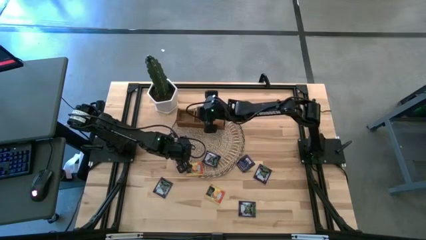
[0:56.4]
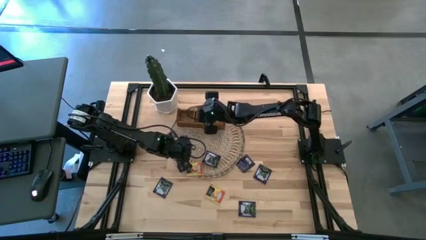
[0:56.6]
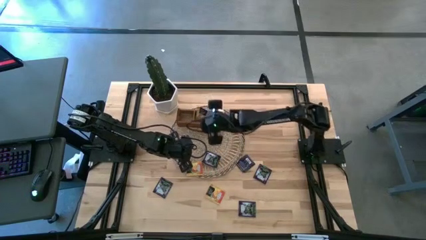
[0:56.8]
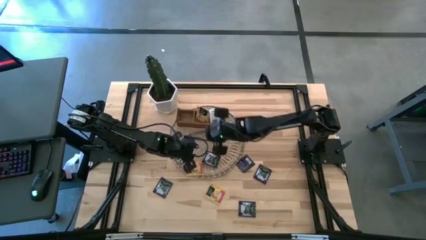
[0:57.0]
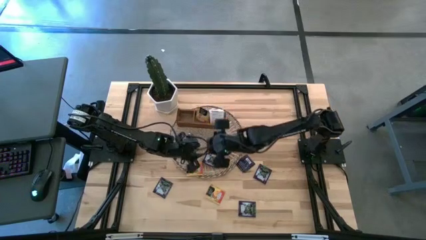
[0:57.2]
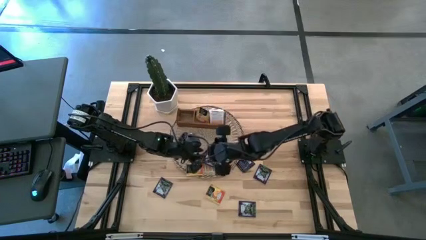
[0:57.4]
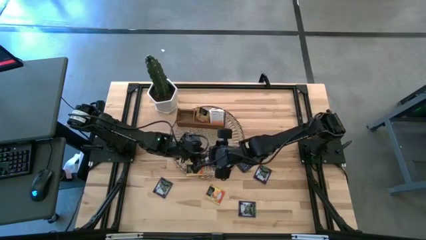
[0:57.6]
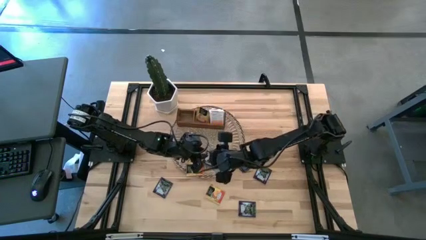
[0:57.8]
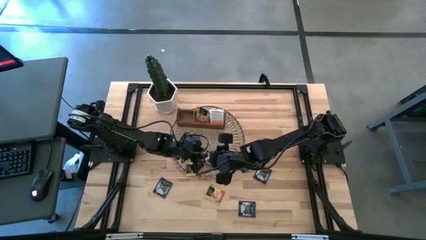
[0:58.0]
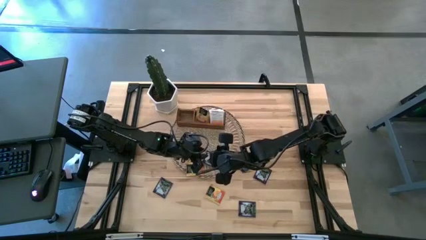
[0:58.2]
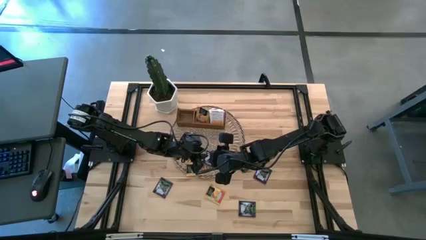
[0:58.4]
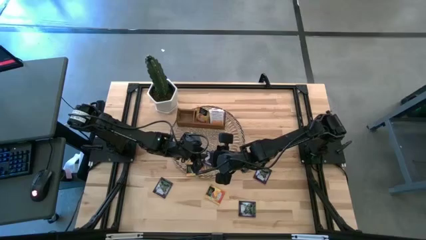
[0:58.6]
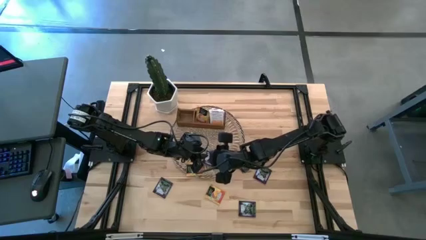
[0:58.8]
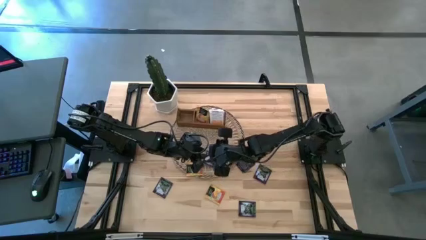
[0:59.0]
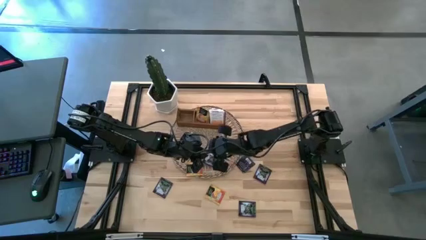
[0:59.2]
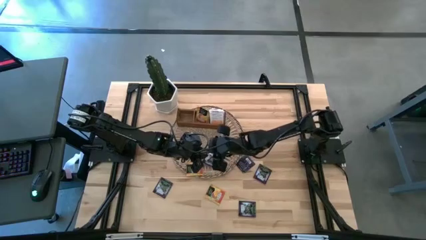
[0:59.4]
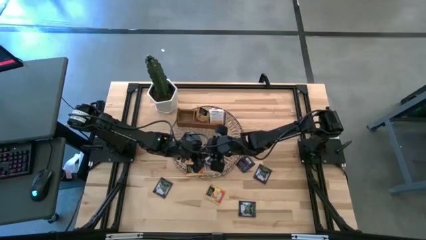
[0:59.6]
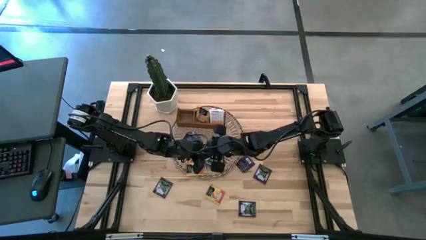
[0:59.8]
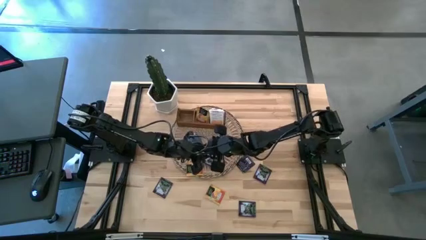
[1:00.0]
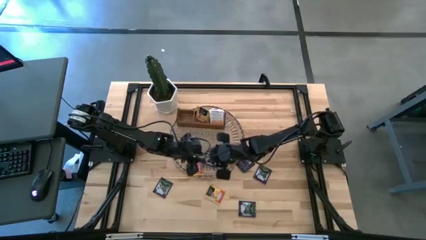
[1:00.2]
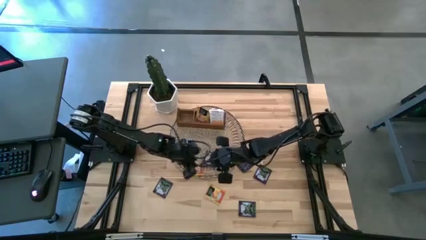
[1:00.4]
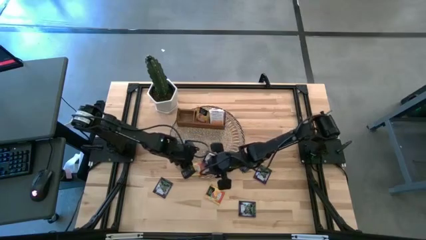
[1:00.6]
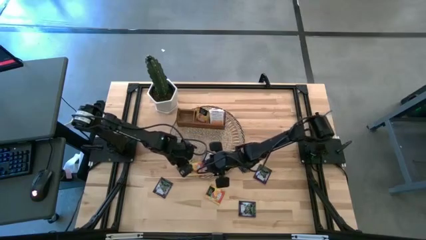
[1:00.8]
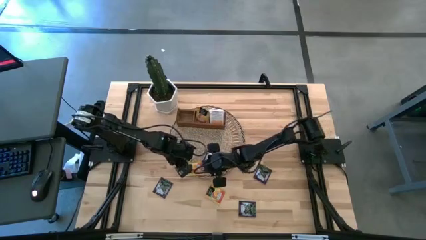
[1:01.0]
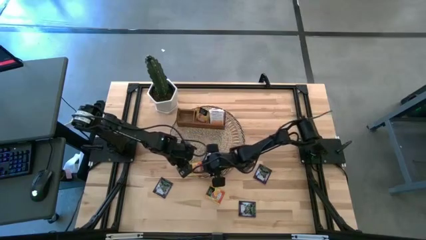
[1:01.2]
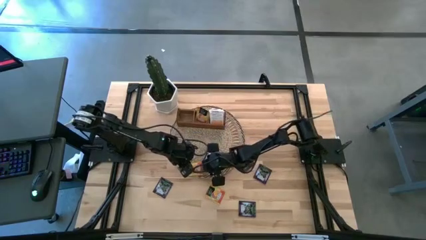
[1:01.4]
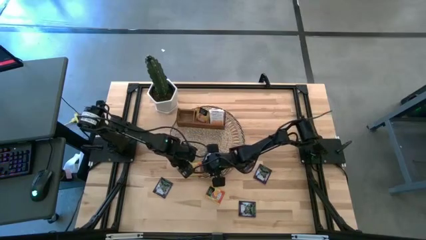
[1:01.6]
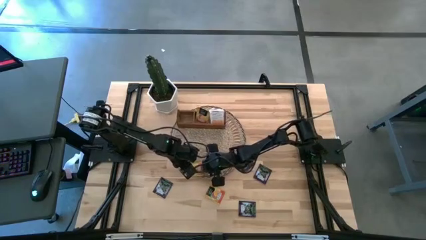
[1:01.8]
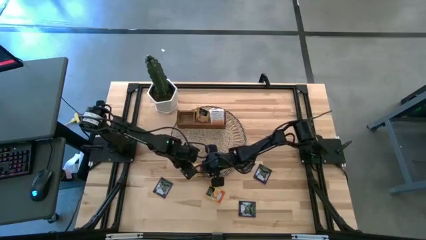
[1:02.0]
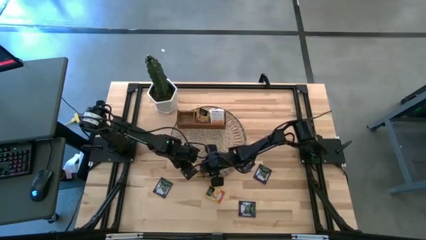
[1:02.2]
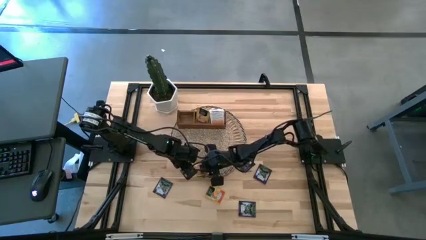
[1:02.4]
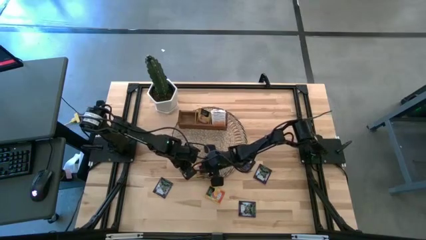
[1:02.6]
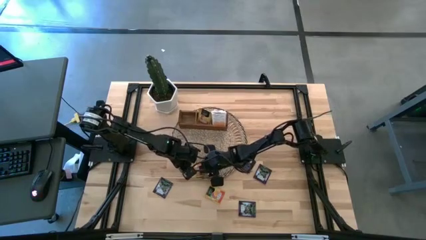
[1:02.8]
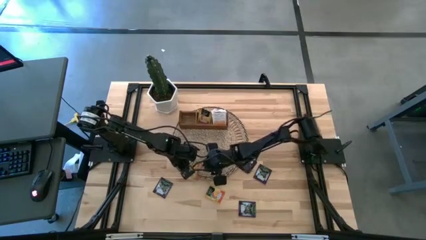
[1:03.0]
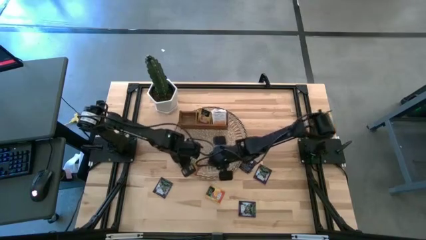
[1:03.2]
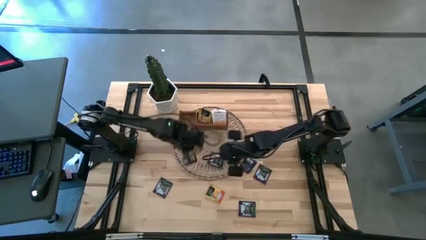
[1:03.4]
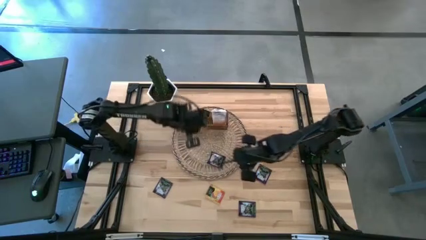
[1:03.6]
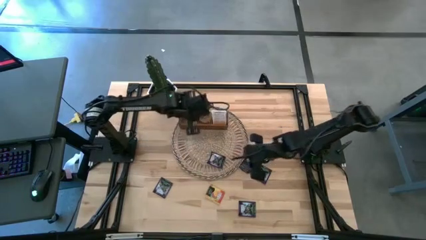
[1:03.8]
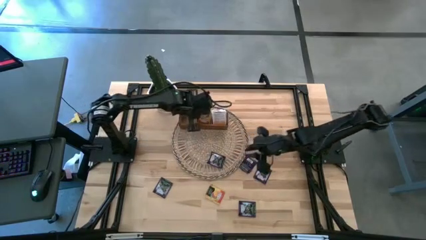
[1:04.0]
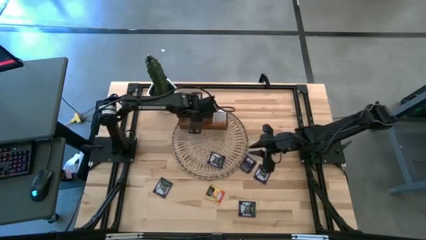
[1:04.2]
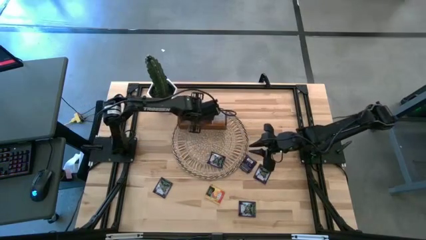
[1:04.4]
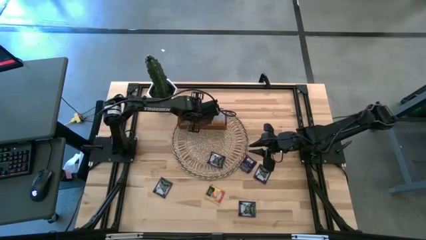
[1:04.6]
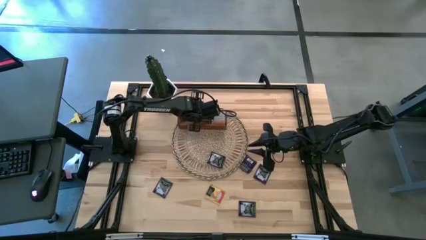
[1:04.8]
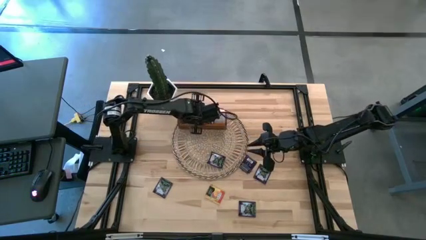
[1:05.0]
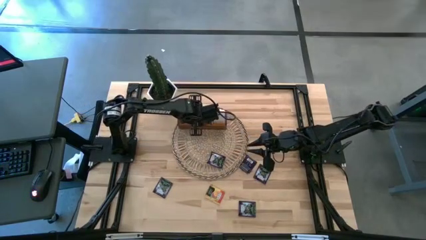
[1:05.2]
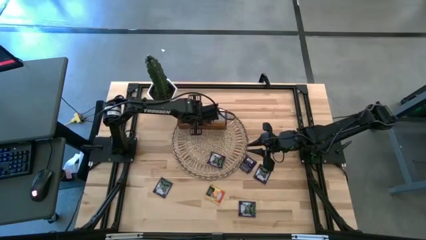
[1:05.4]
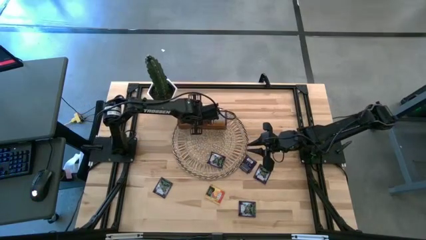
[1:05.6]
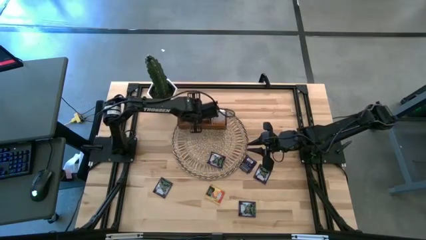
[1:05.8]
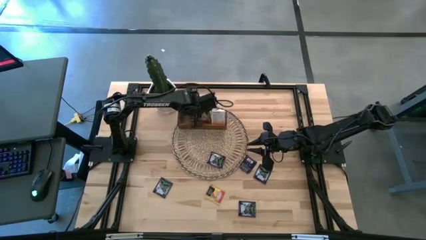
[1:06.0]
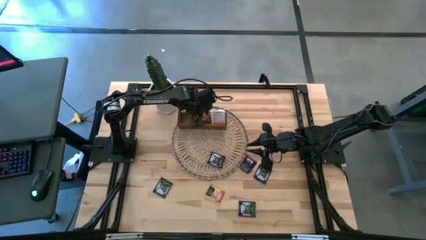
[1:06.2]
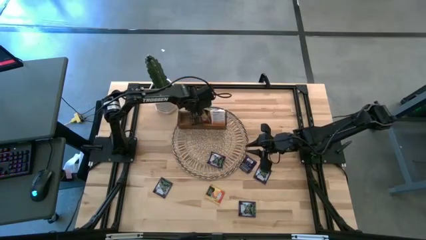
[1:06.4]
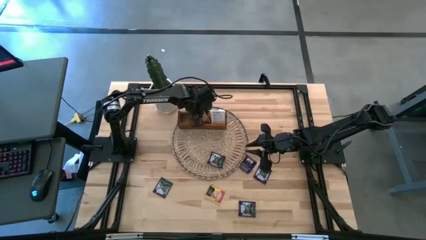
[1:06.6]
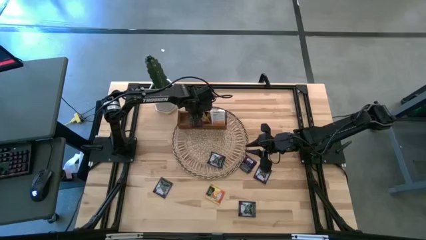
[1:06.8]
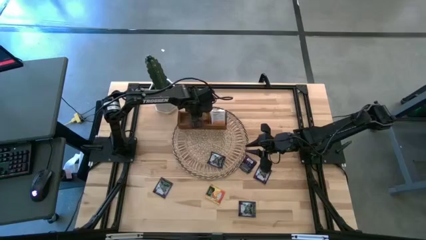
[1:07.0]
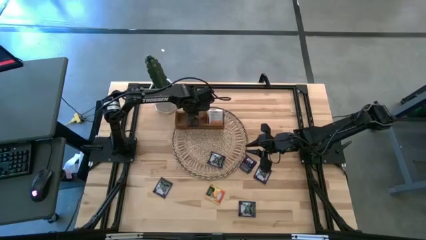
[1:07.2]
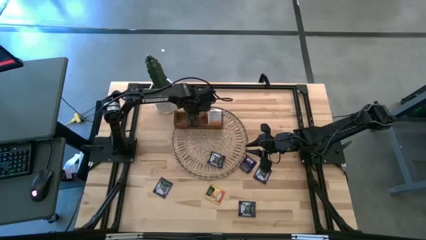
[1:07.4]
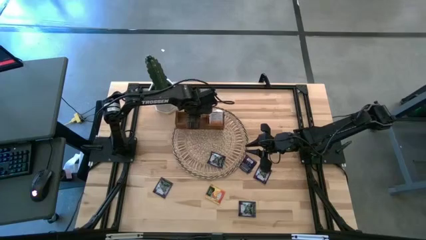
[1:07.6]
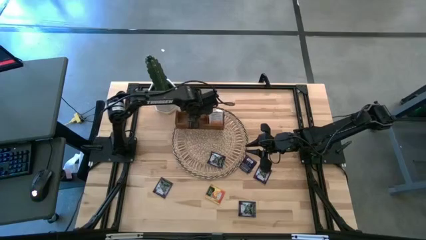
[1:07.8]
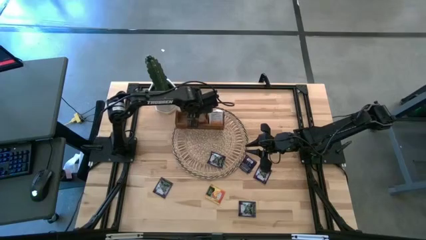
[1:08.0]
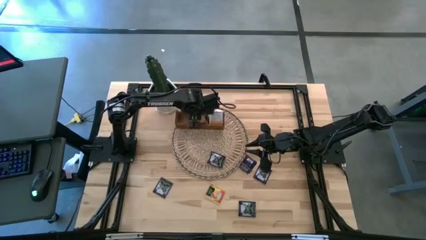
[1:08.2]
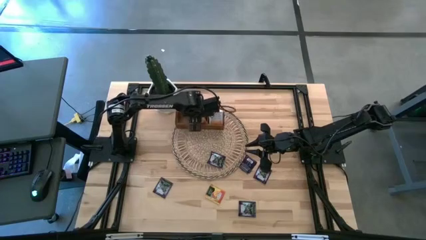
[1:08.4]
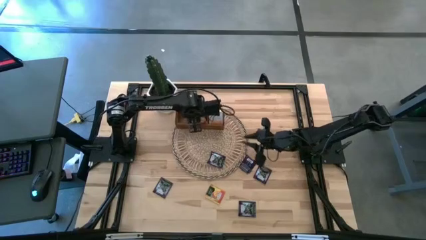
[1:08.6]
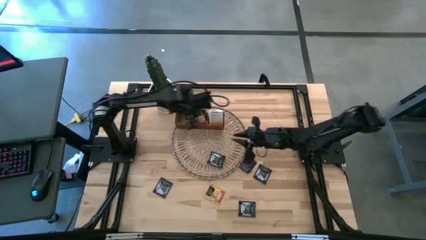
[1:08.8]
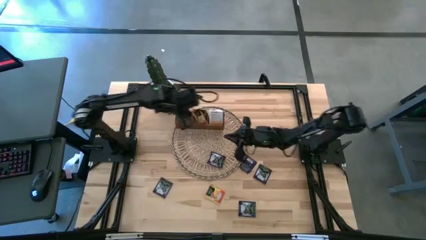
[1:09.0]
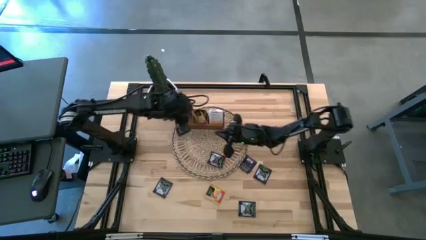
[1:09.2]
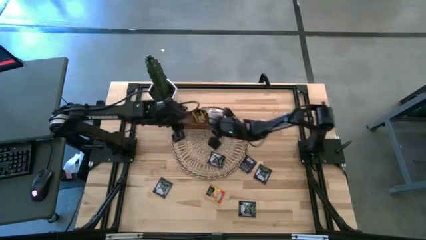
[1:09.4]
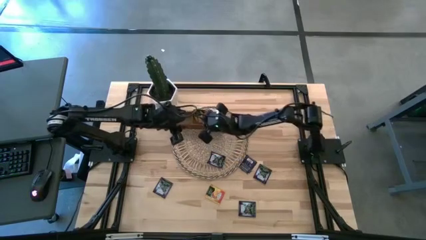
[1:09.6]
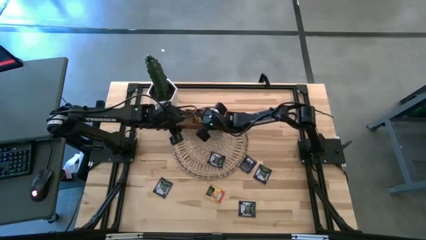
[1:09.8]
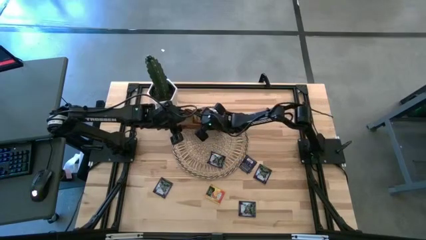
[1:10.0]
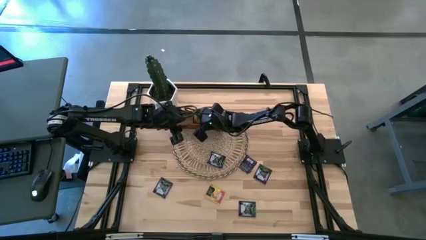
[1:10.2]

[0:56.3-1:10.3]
Task: Pick & Place Tea
Put the orange tea bag into the middle section of the wooden organizer

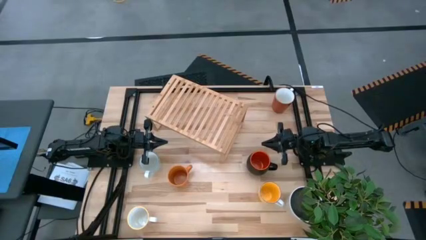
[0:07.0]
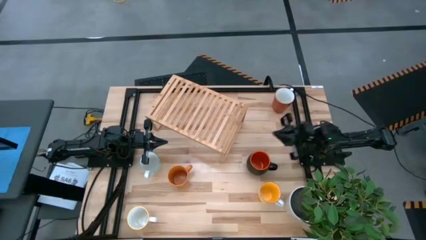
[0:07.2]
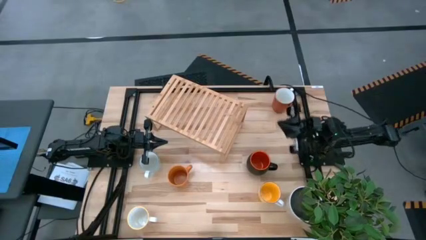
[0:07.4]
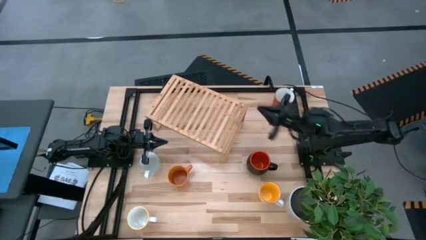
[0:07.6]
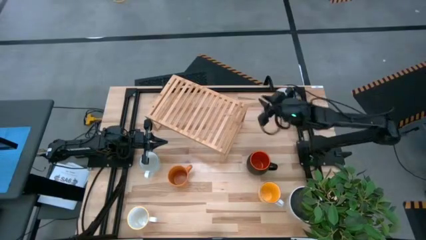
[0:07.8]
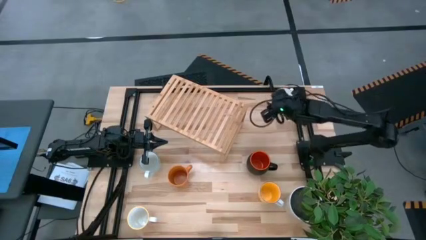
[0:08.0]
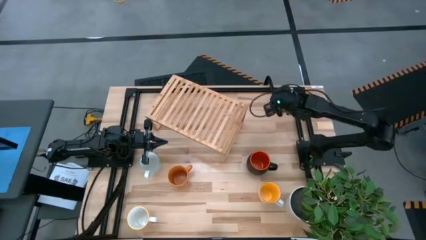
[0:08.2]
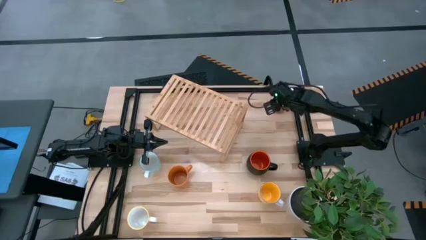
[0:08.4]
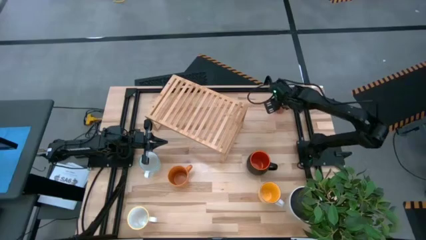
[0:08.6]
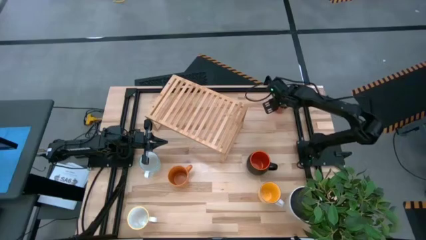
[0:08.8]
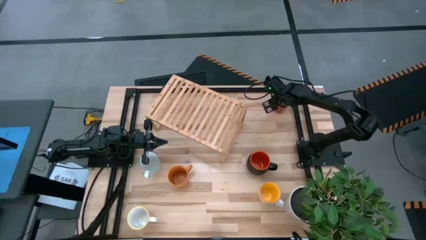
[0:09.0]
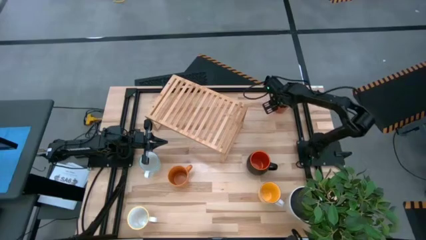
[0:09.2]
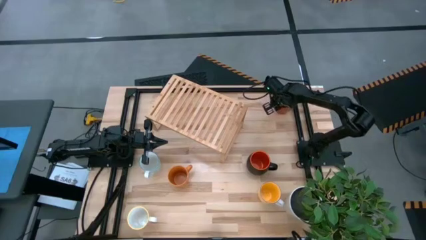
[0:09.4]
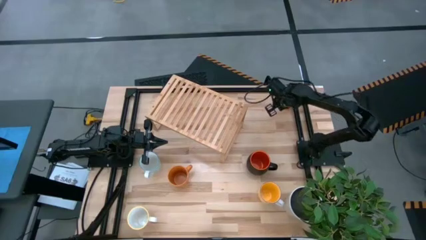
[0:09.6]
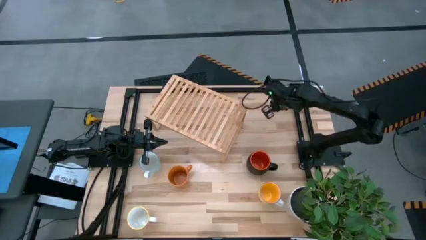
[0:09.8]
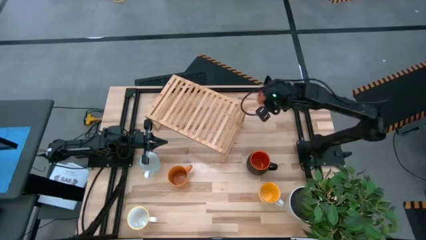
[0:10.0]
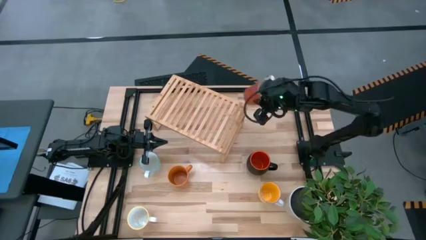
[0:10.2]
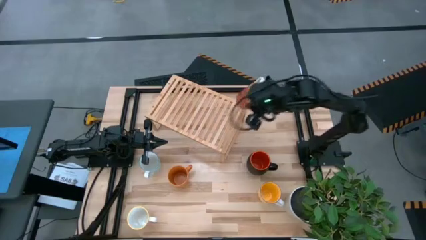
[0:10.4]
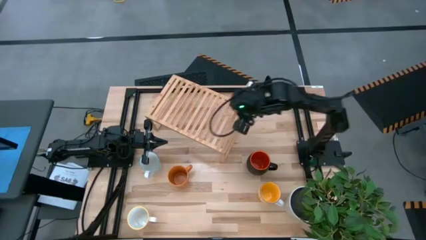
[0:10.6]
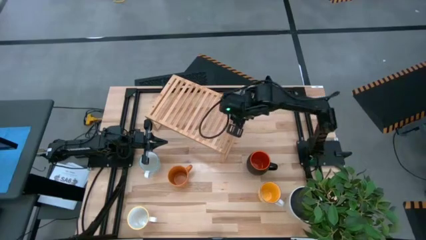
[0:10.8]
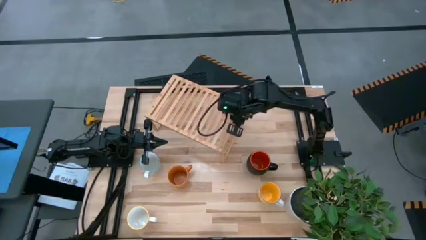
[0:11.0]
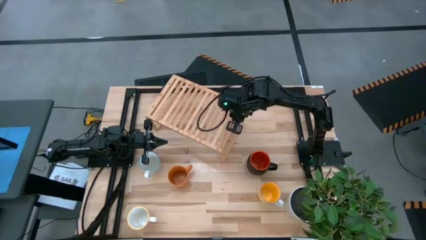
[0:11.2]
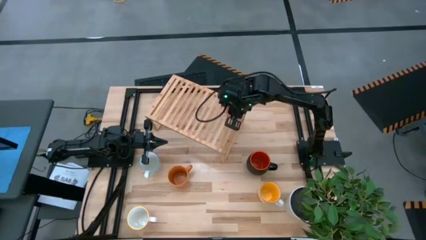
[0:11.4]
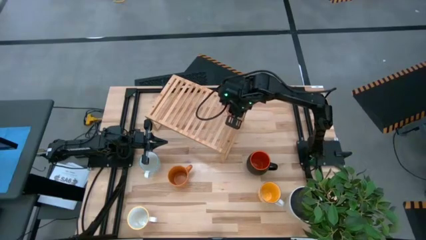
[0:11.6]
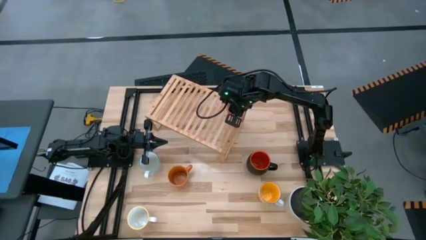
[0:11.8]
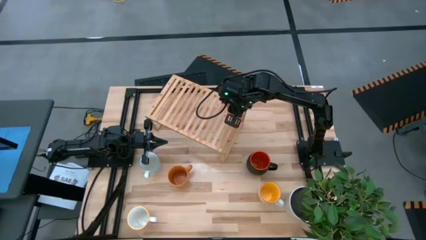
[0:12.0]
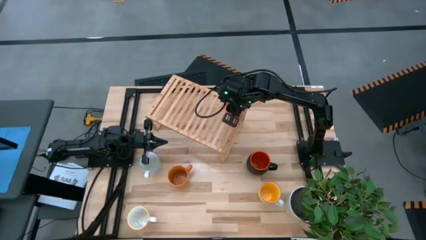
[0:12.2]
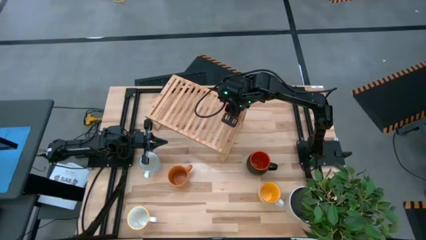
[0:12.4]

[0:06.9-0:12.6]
Task: Place coffee mugs
Put the orange white mug on the shelf
